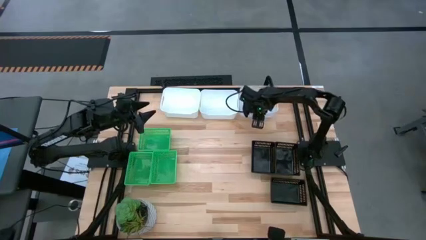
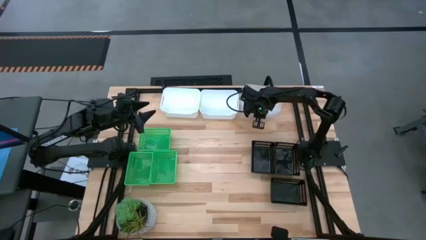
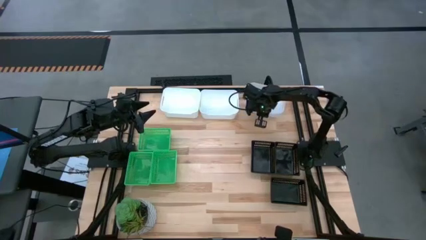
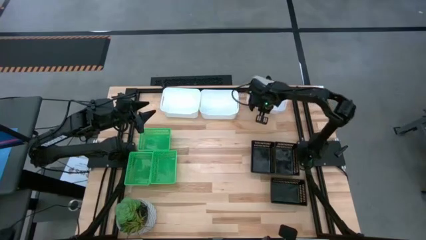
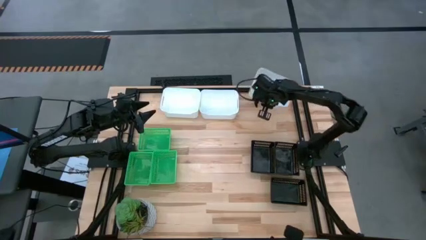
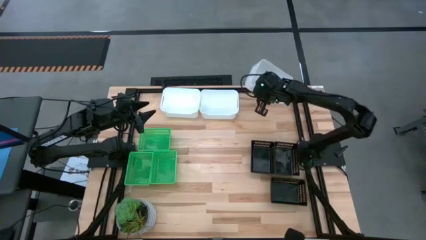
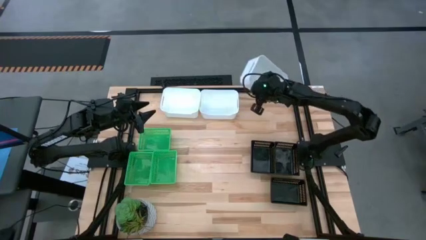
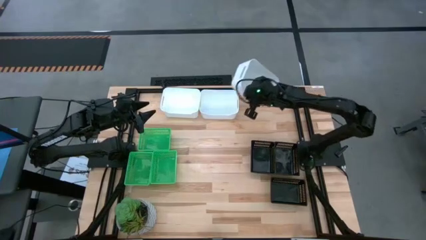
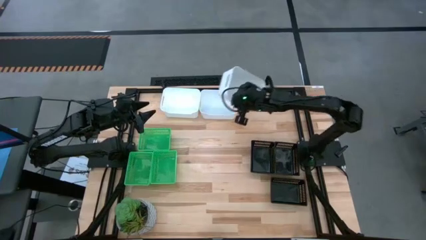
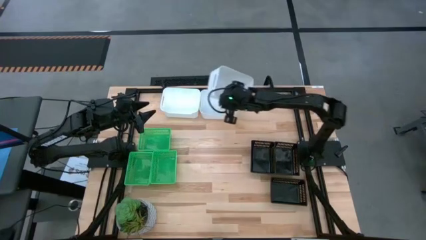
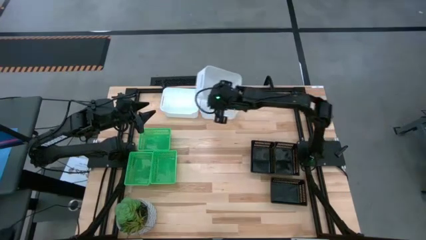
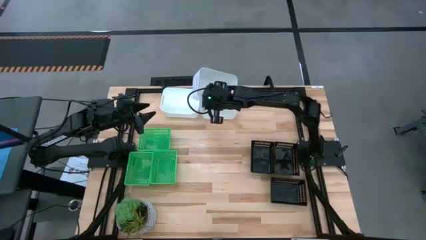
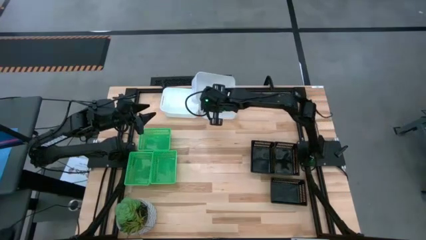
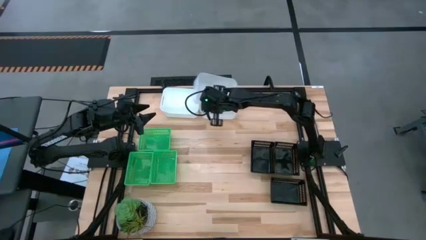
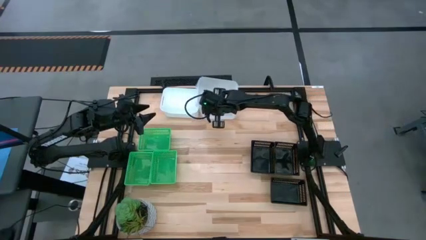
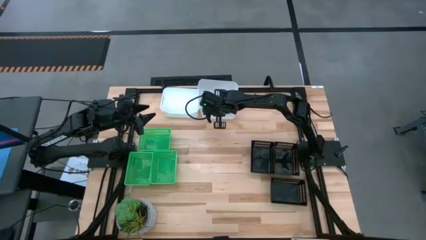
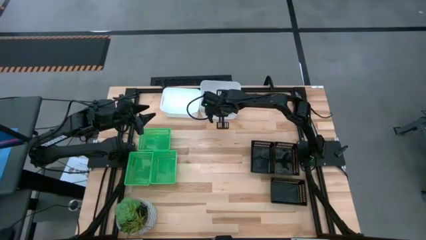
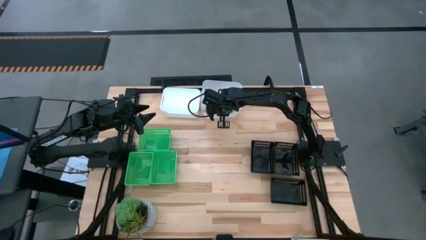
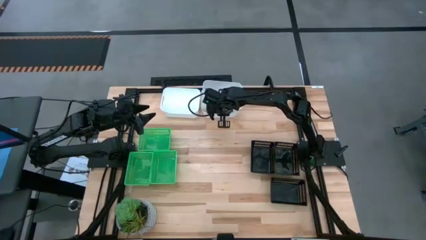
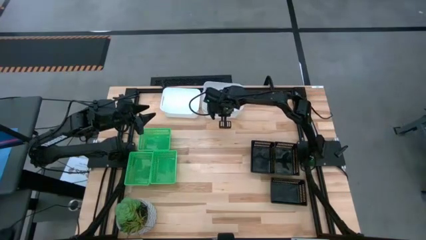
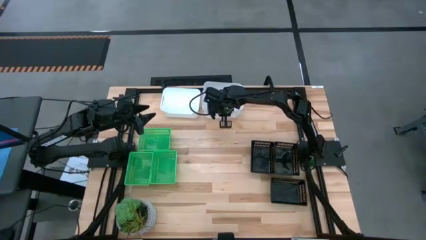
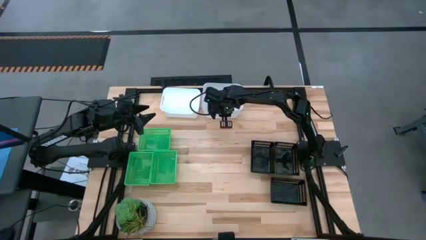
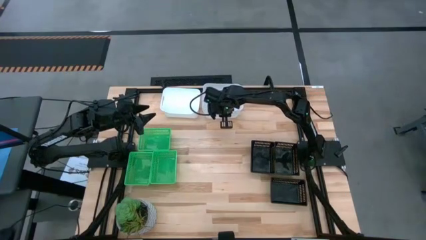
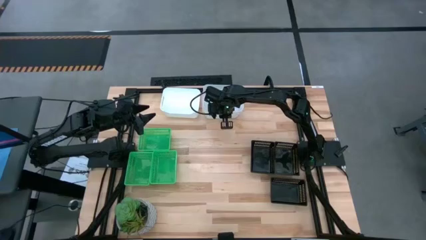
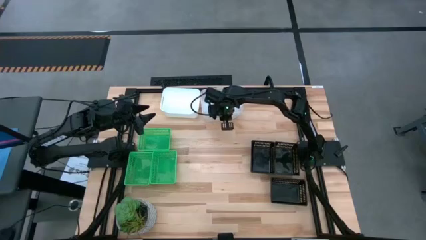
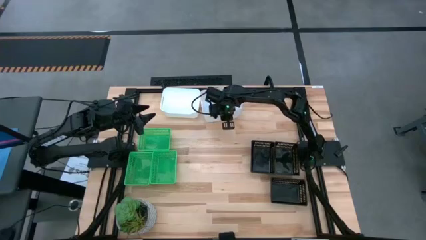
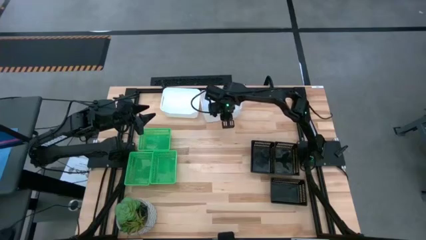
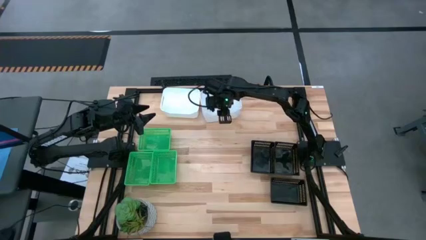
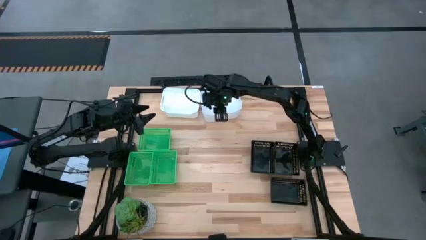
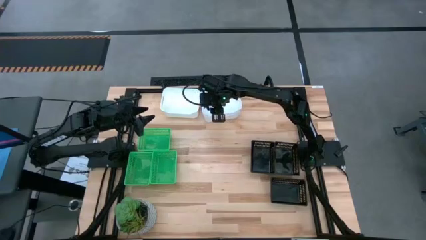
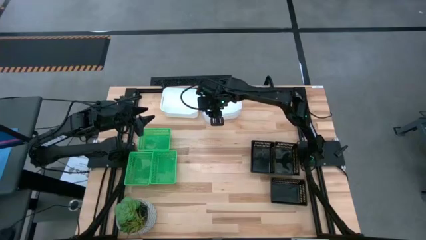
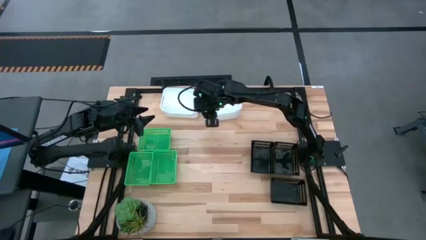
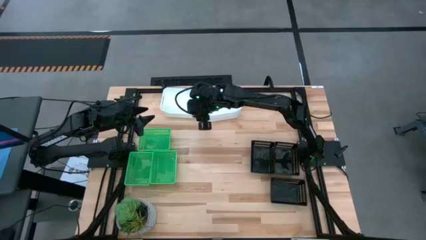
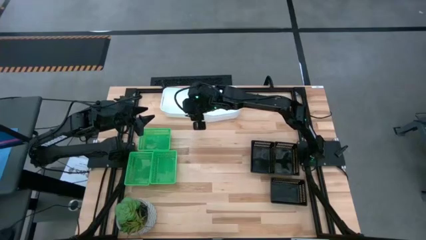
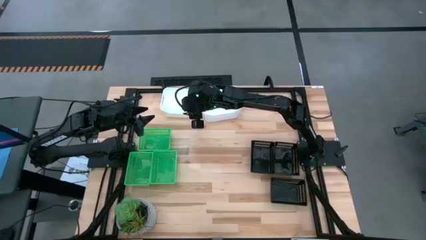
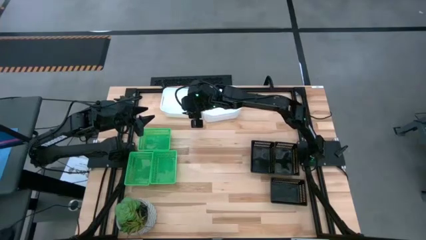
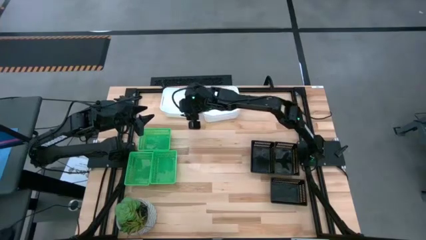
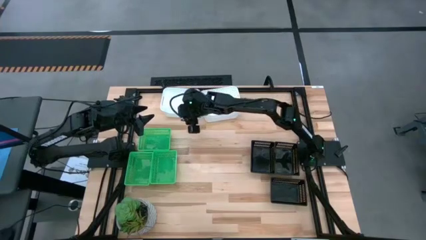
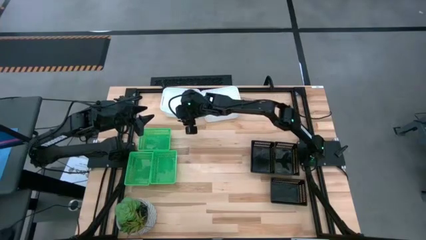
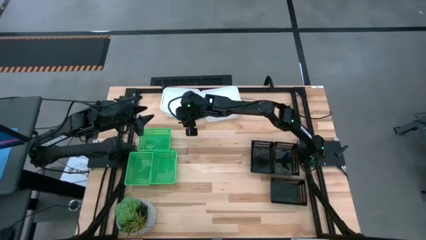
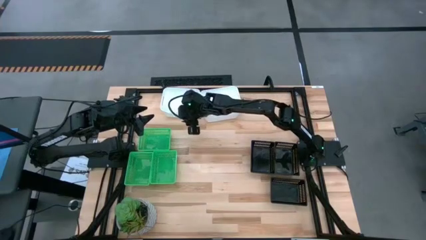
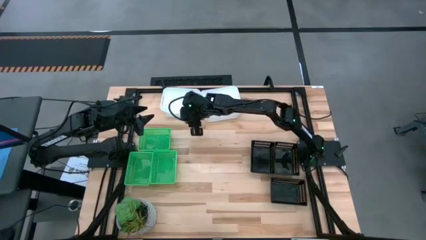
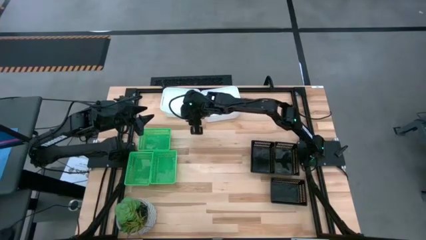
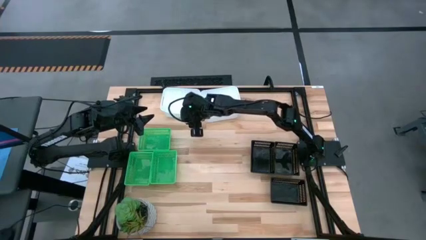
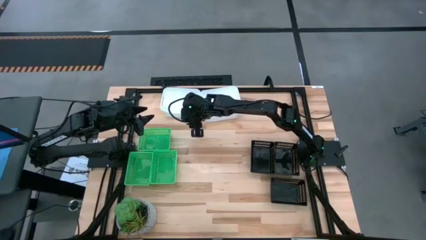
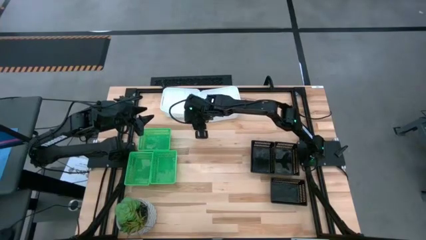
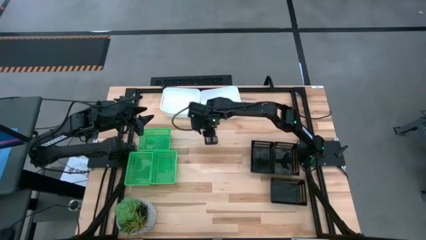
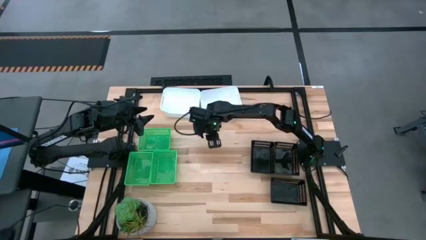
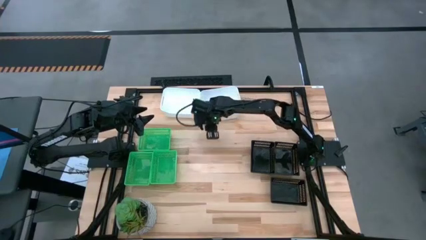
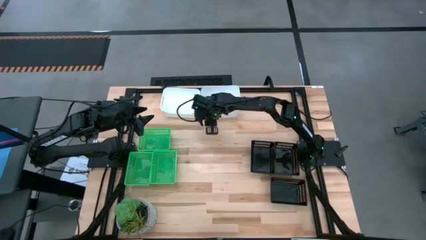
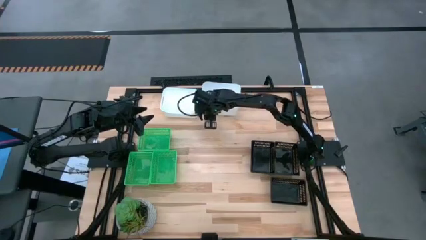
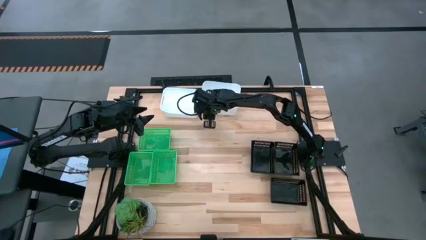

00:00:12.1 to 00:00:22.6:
Stack the right white bin into the middle white bin

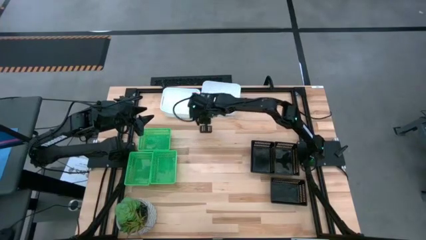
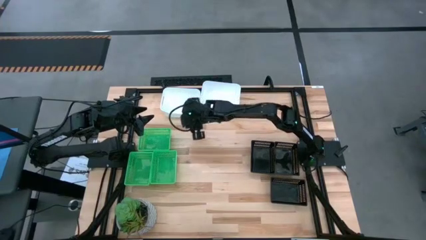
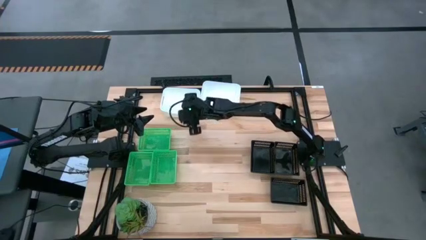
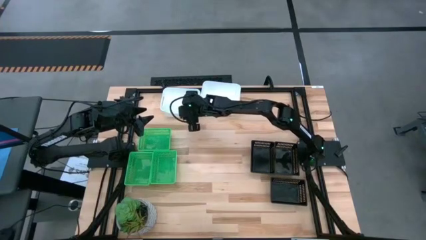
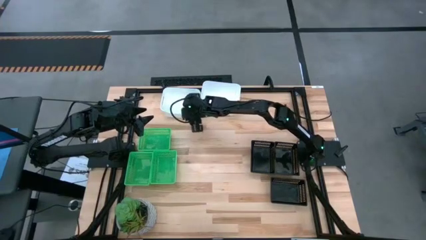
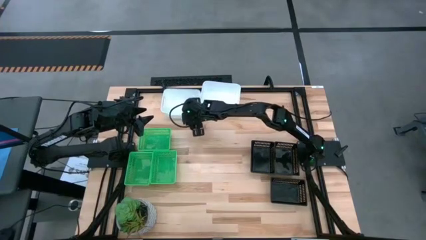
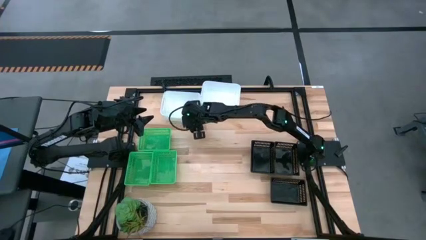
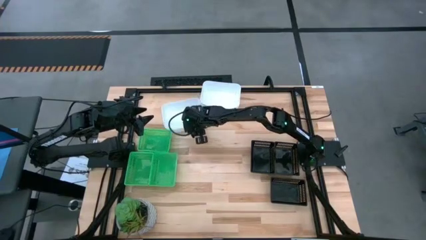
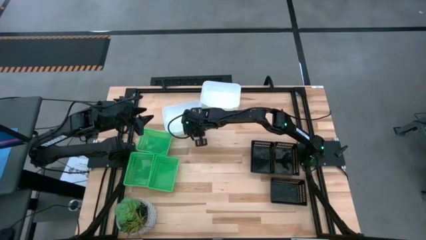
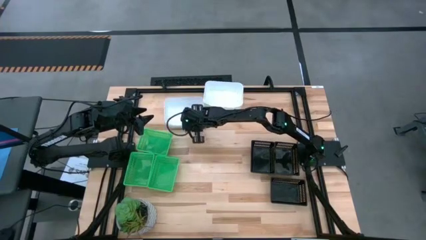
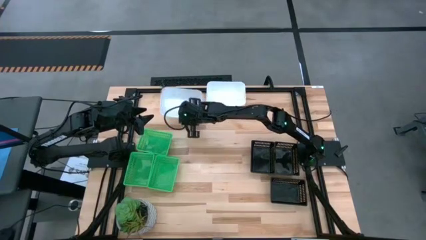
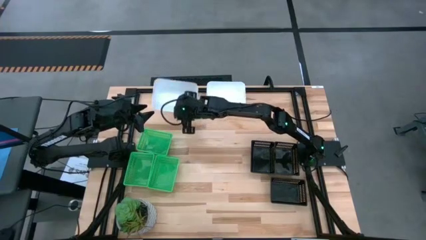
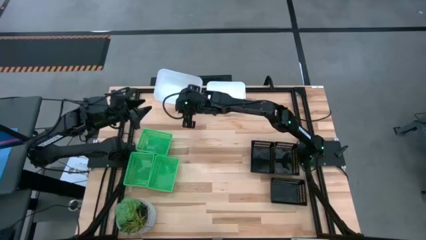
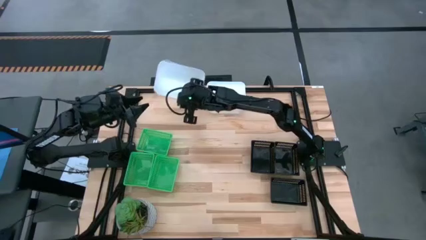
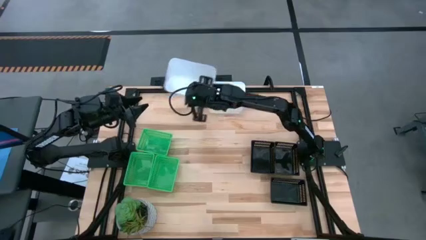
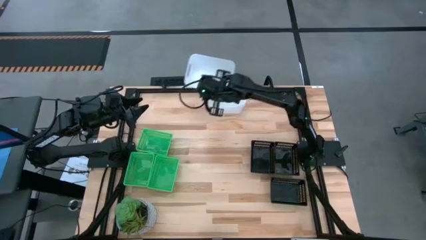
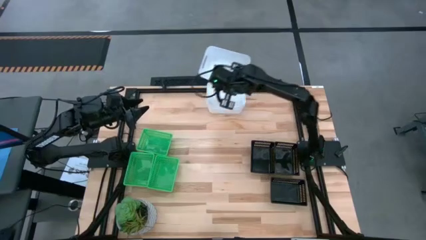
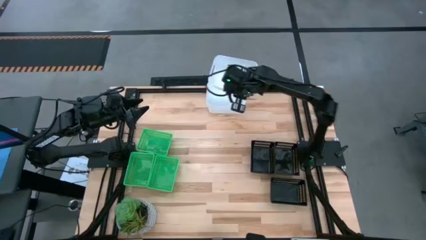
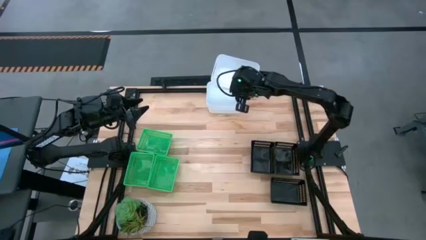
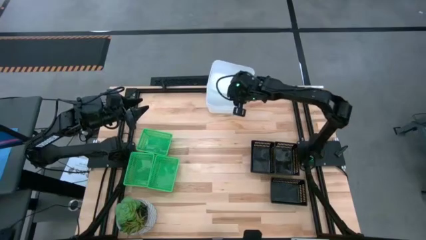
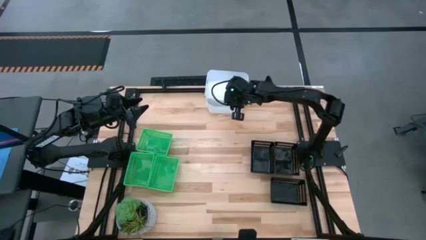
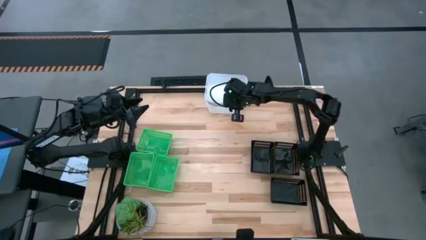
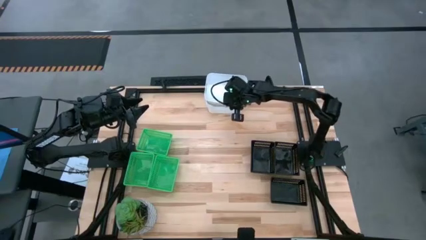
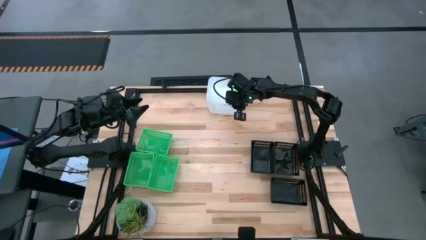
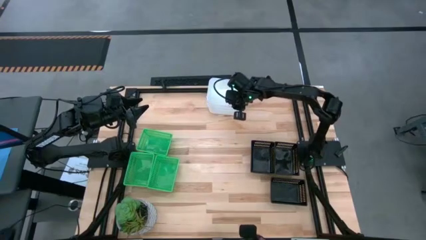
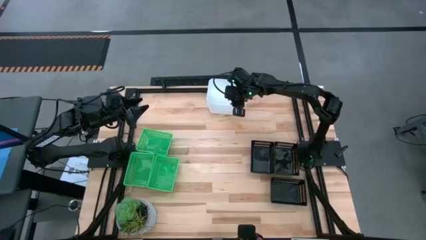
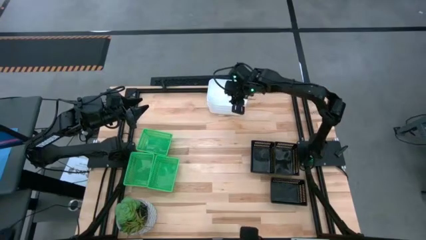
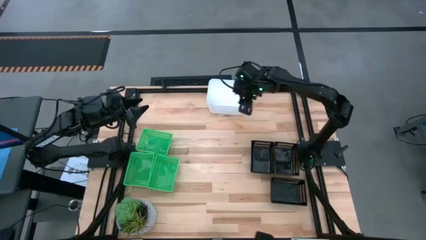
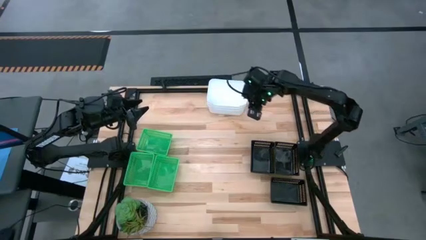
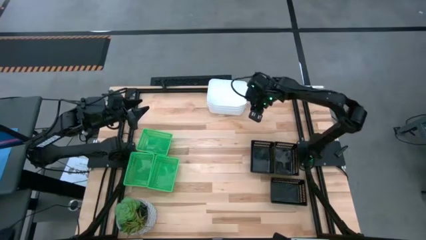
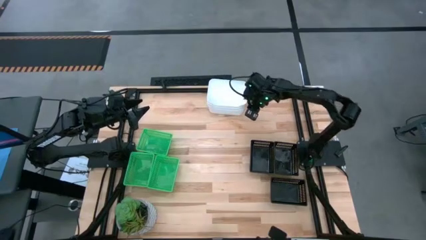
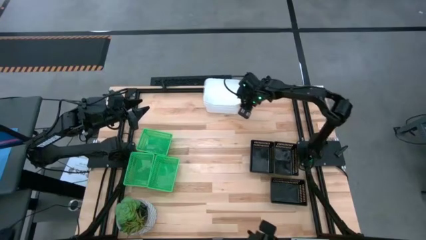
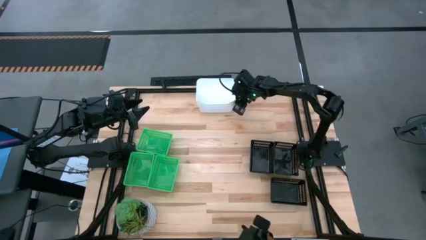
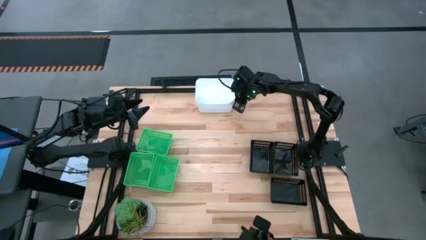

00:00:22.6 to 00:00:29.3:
Stack the left white bin into the right white bin
